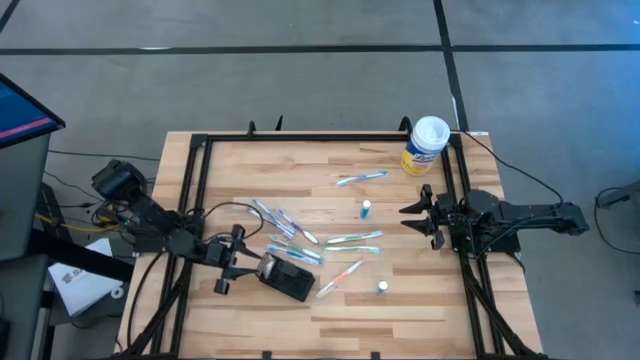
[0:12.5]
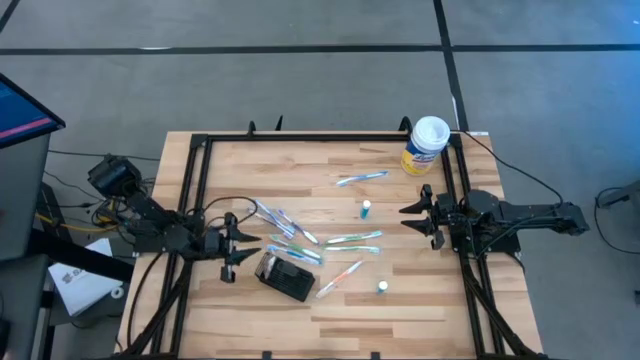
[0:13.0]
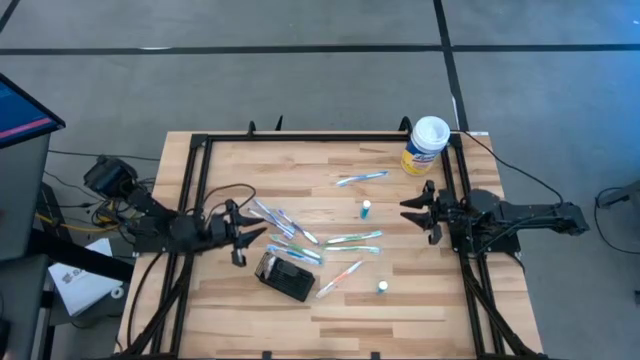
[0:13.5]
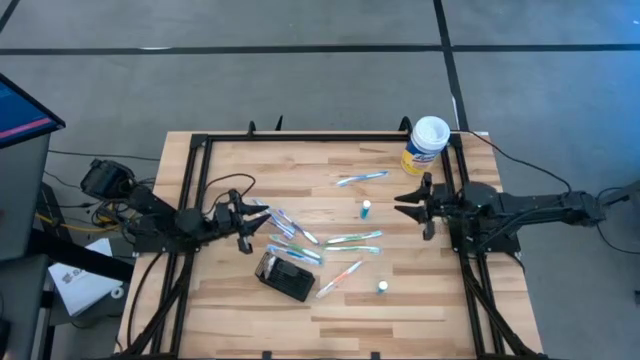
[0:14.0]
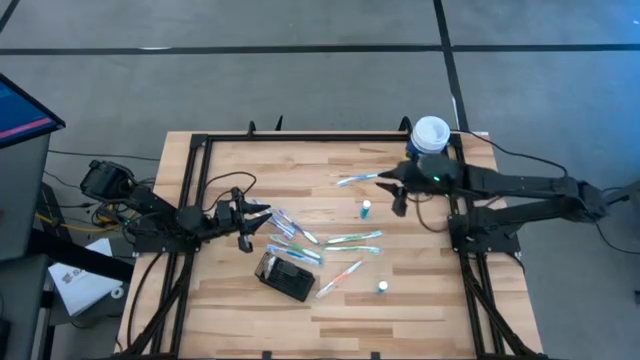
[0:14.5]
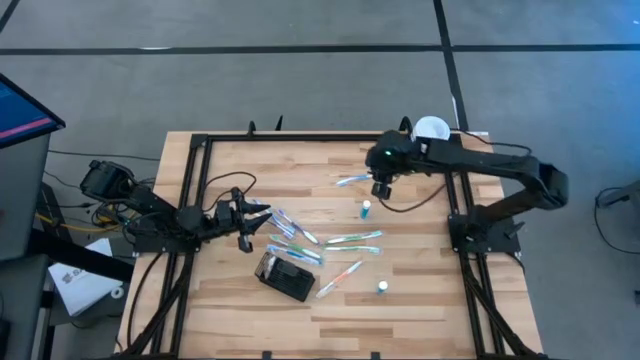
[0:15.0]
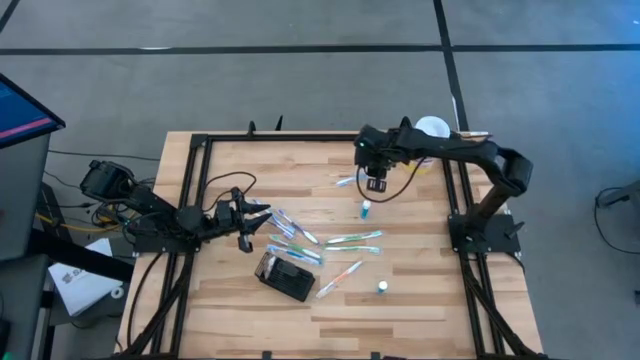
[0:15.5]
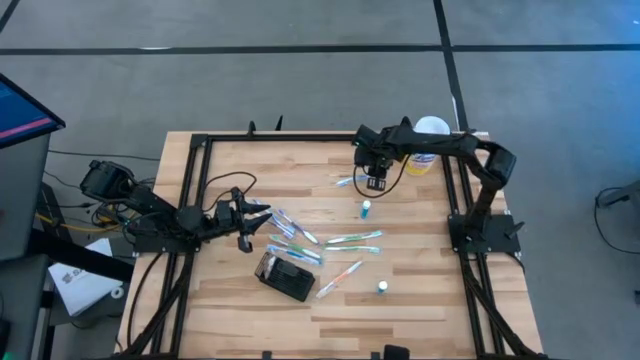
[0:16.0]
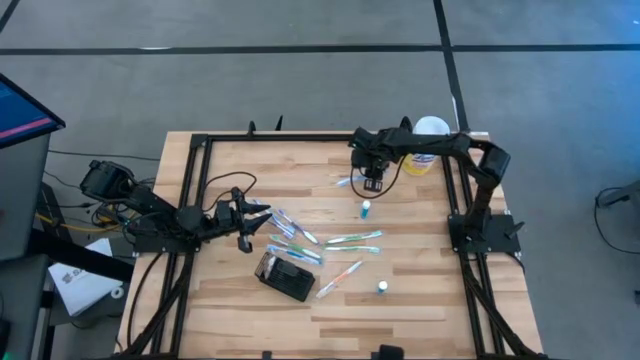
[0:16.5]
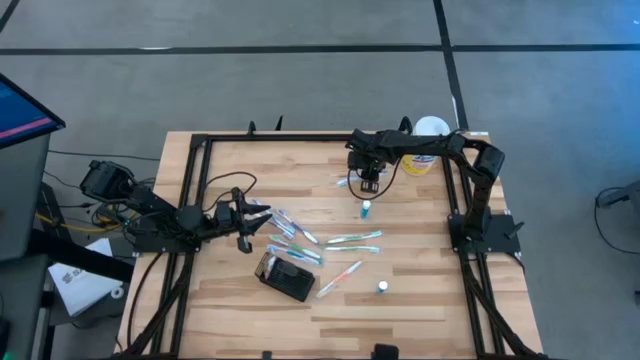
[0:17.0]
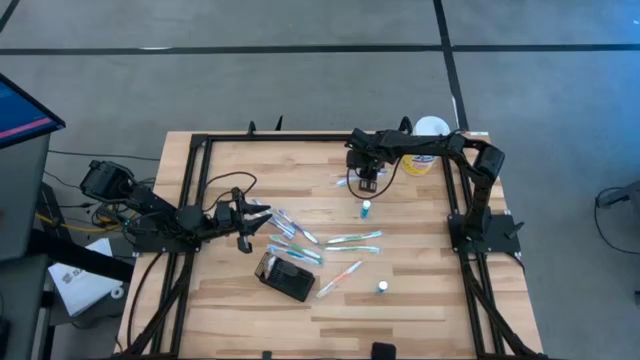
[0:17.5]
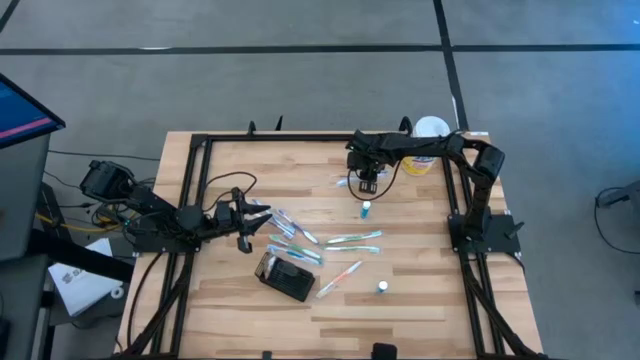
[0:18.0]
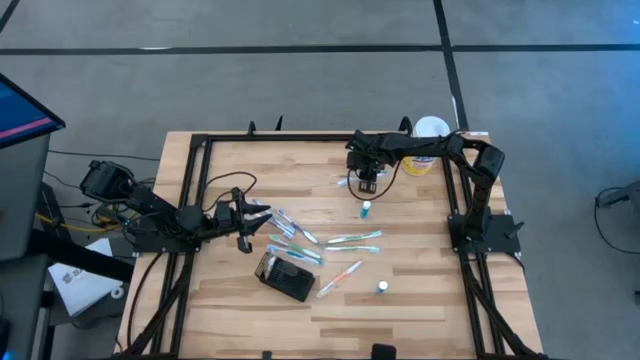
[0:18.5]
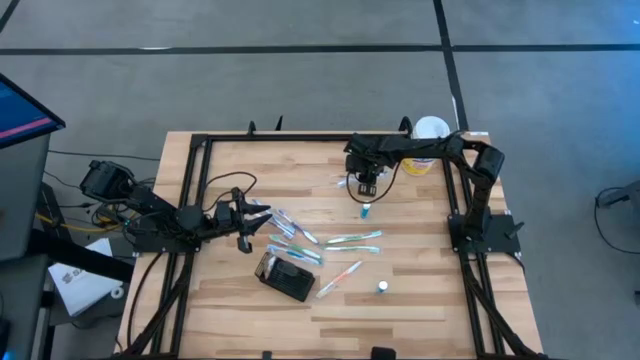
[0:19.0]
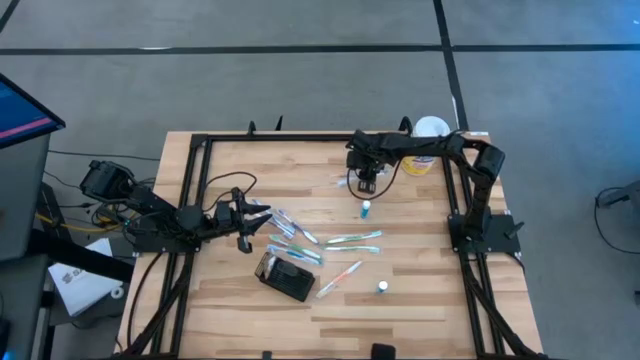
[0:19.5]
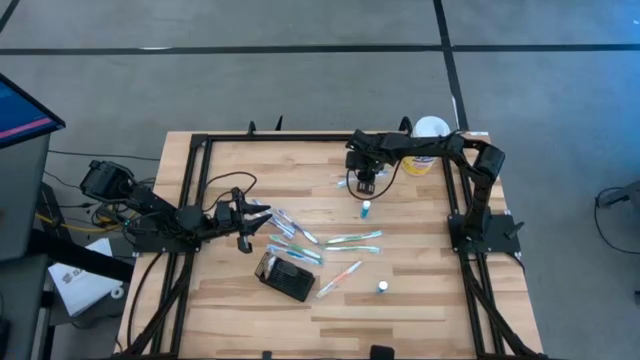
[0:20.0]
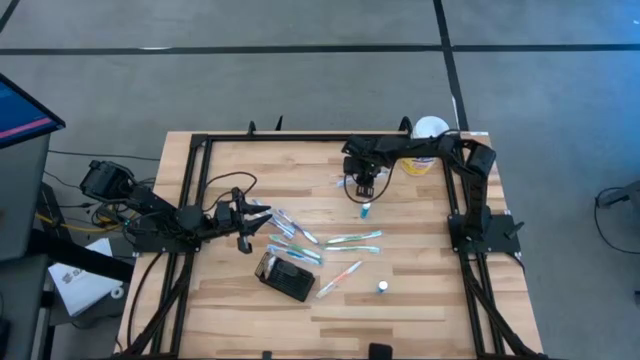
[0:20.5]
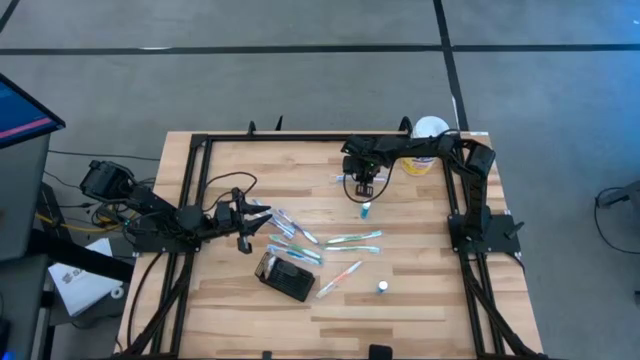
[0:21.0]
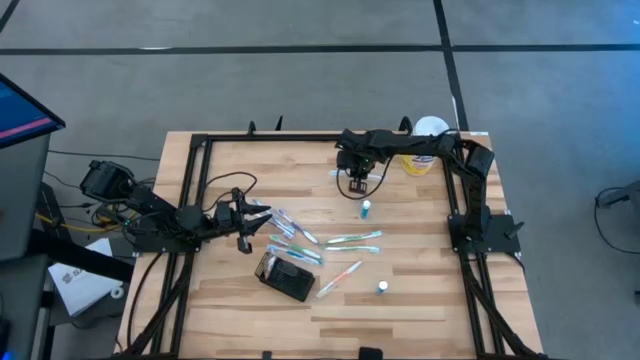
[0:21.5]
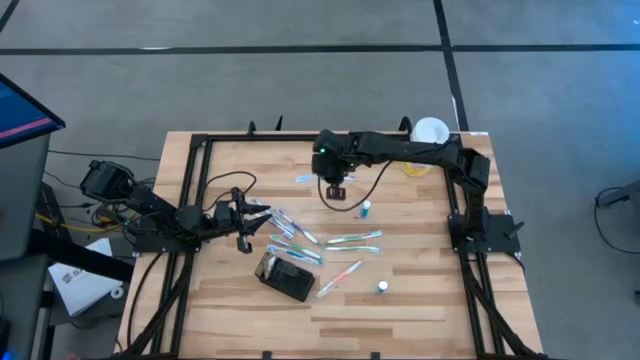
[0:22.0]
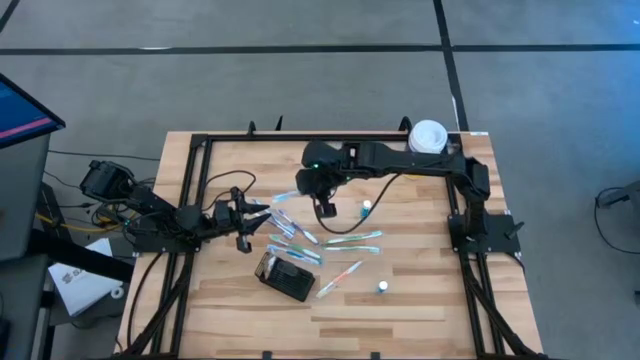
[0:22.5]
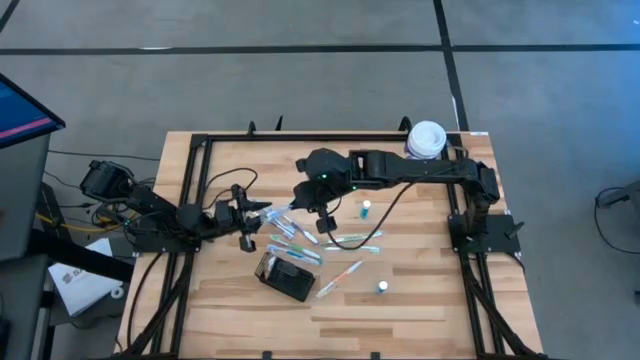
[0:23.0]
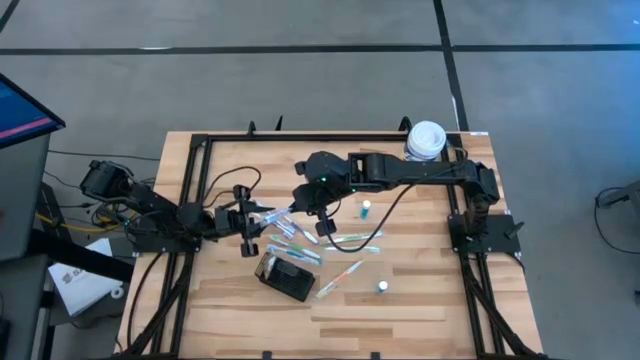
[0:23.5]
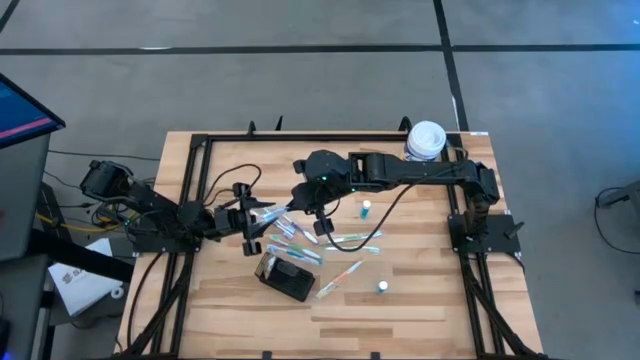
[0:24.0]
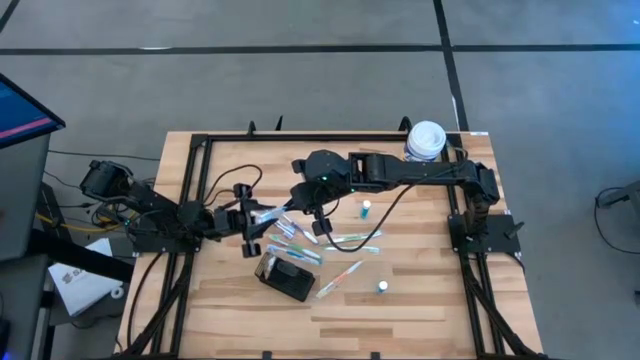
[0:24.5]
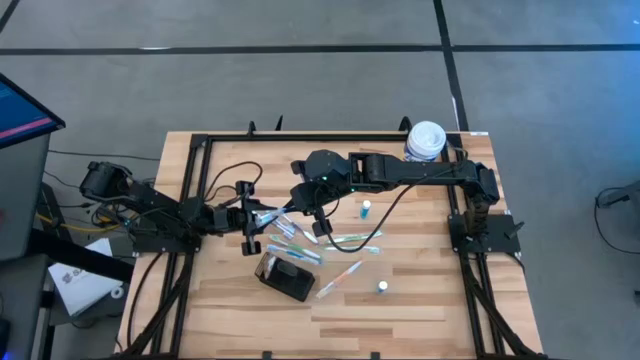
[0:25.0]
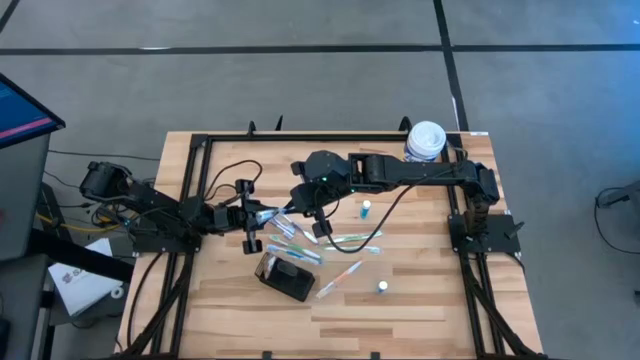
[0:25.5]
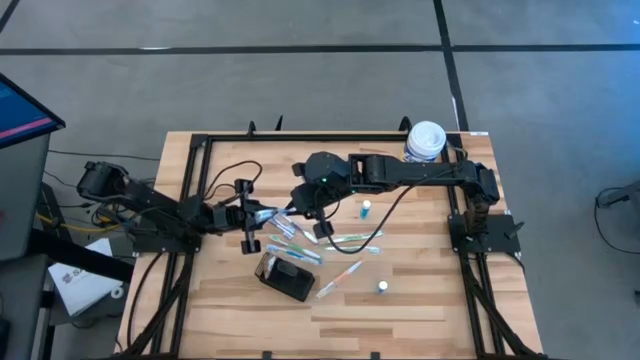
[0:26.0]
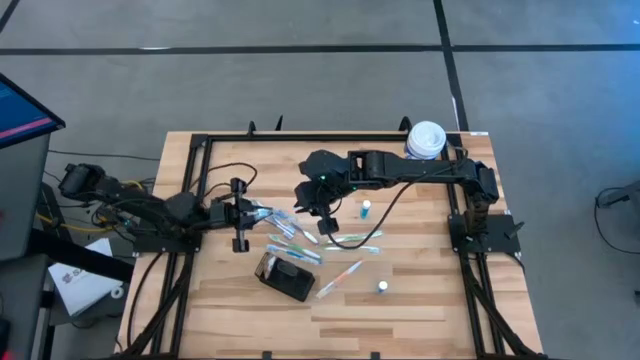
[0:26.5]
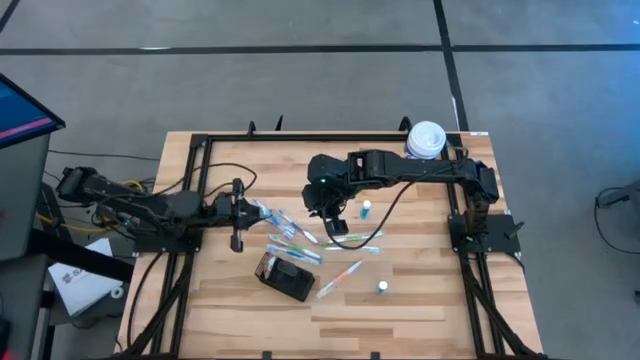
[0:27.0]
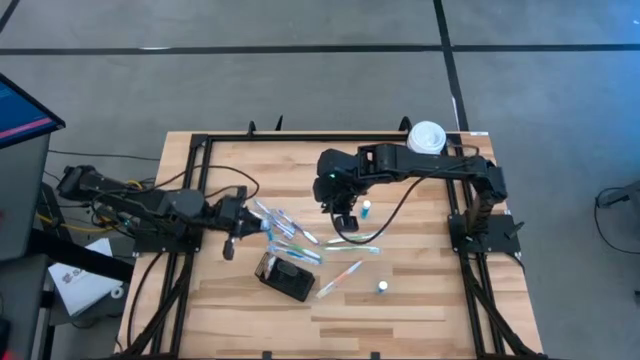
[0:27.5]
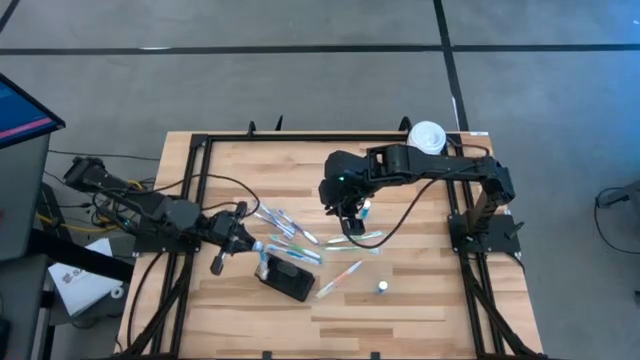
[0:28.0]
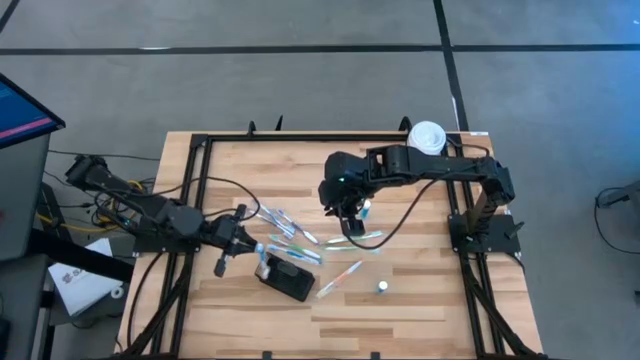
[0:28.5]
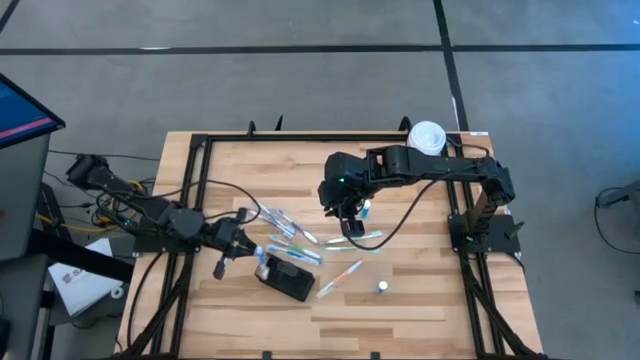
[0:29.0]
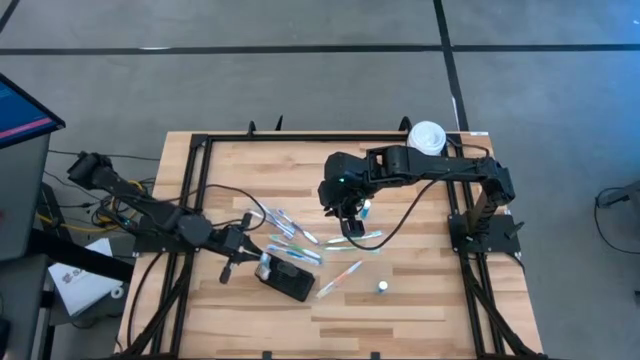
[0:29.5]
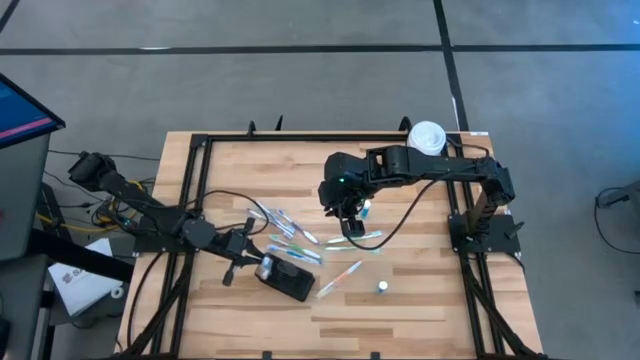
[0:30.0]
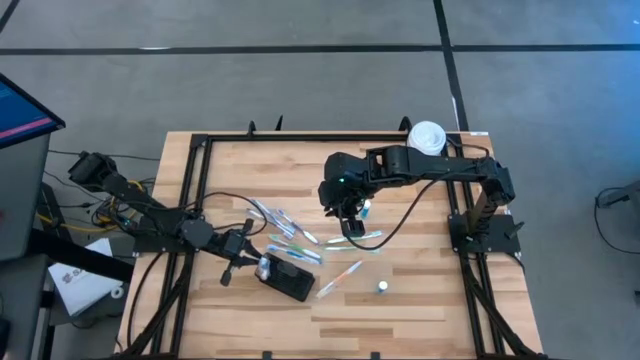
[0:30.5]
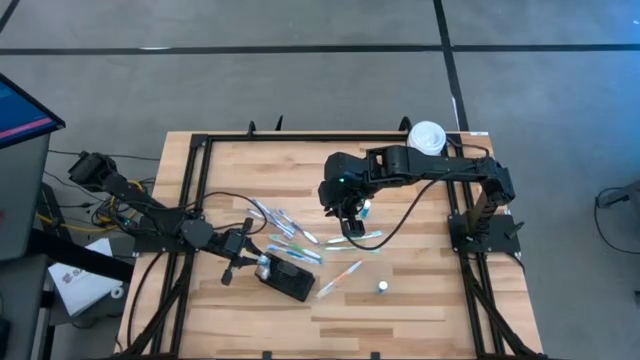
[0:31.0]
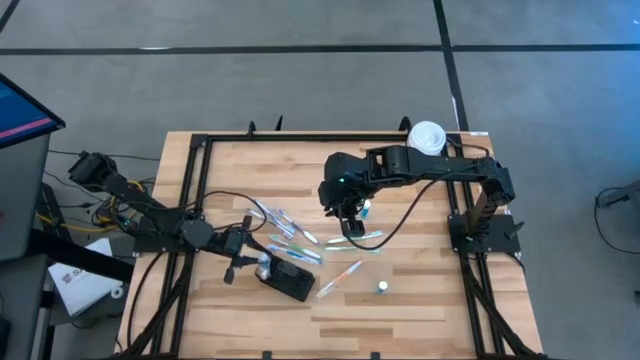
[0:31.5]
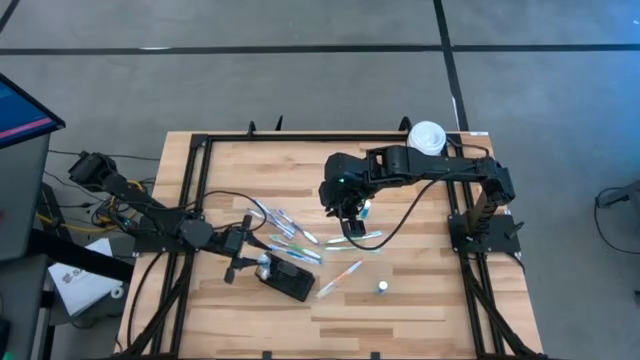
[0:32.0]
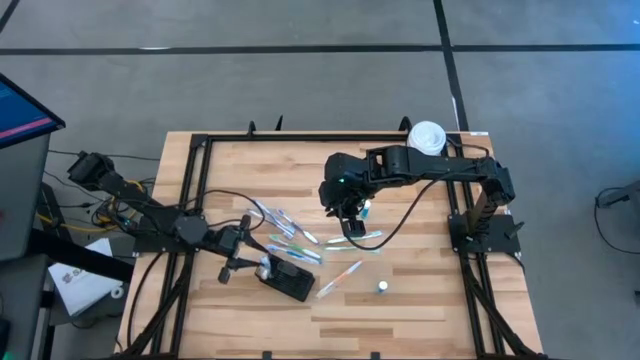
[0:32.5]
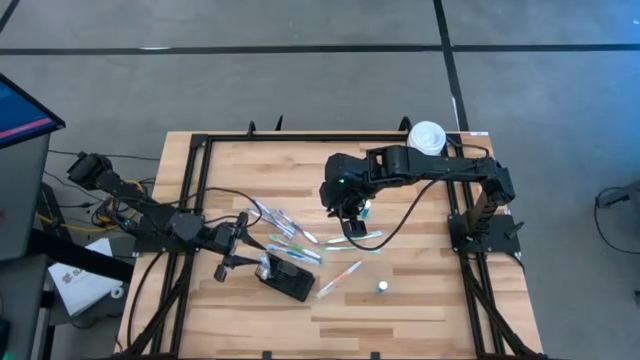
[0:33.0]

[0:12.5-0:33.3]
Task: Pick & Place toothbrushing station
Put the blue toothbrush into the mesh organizer
